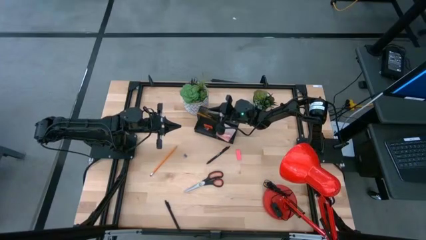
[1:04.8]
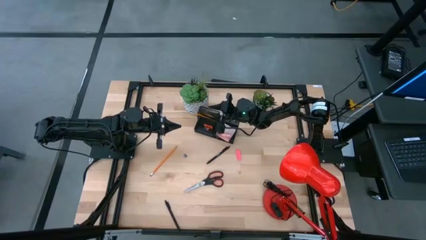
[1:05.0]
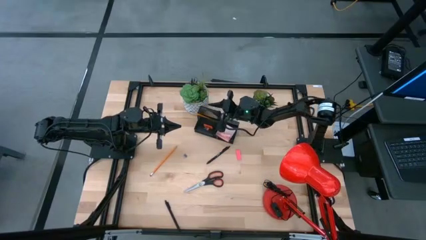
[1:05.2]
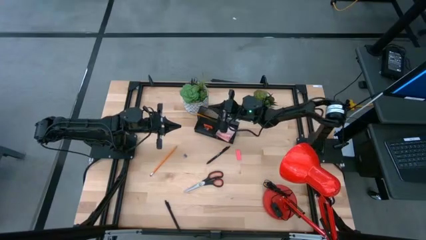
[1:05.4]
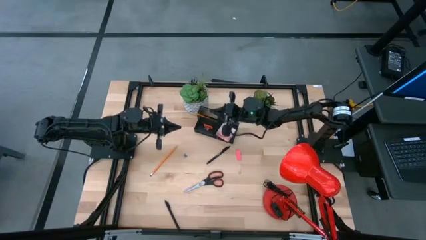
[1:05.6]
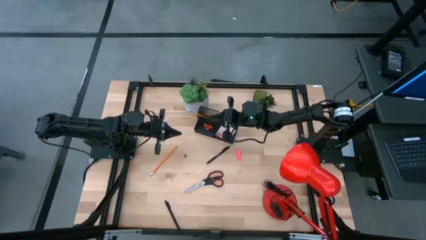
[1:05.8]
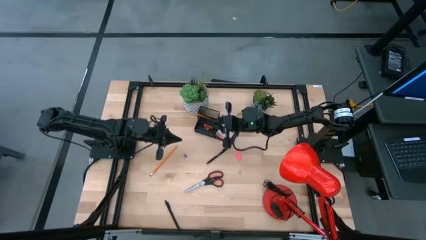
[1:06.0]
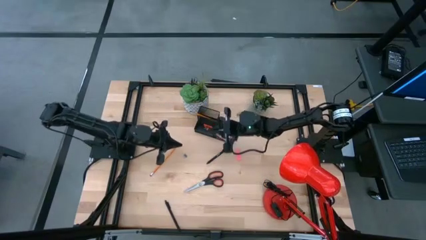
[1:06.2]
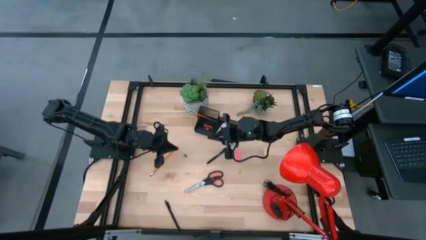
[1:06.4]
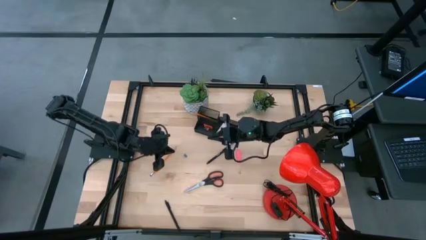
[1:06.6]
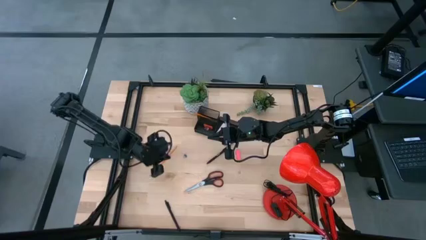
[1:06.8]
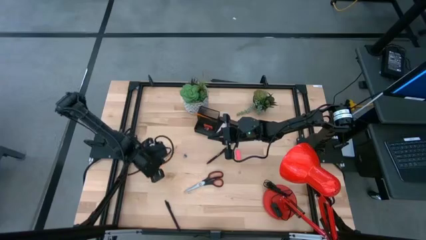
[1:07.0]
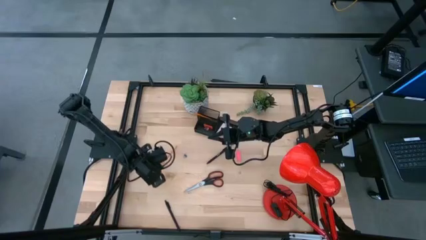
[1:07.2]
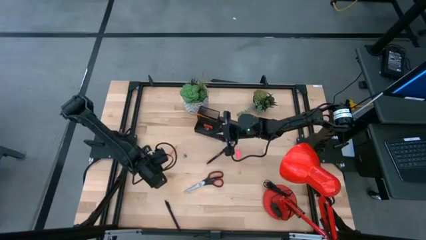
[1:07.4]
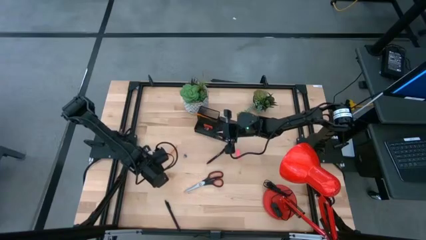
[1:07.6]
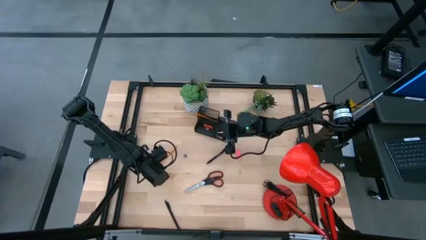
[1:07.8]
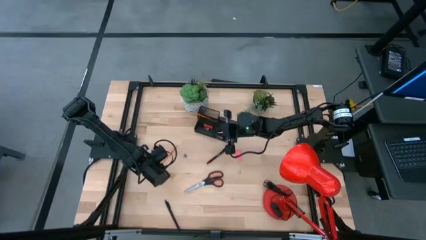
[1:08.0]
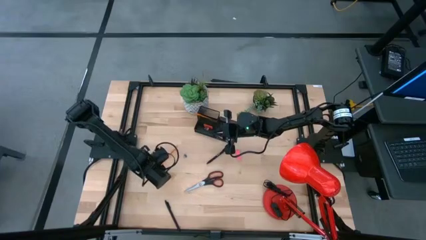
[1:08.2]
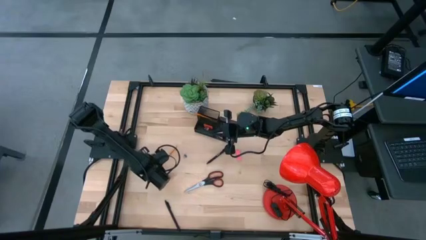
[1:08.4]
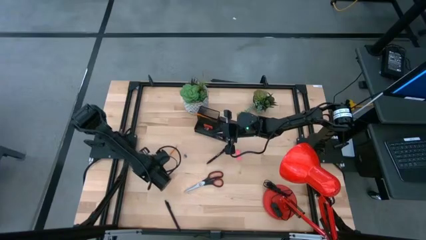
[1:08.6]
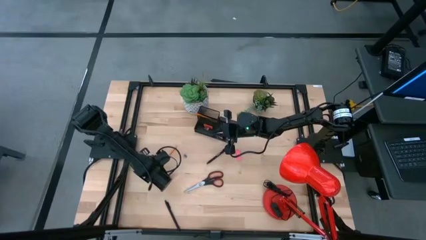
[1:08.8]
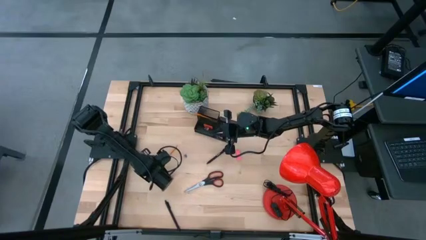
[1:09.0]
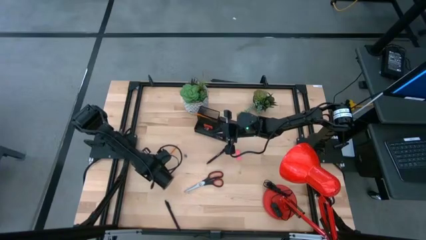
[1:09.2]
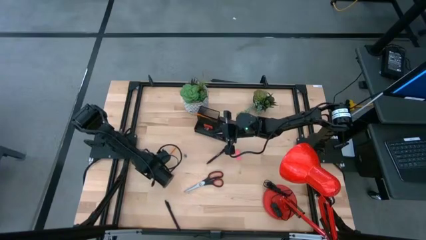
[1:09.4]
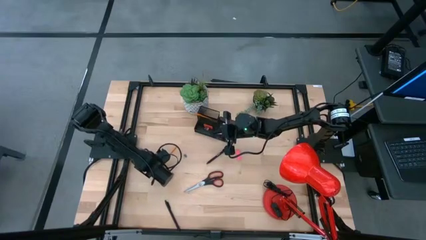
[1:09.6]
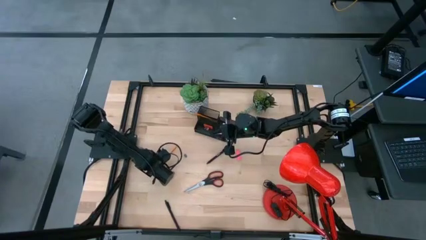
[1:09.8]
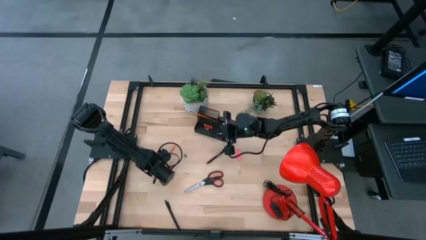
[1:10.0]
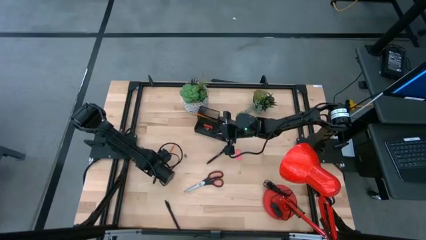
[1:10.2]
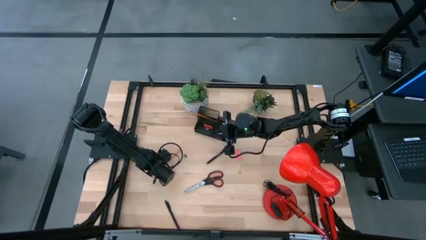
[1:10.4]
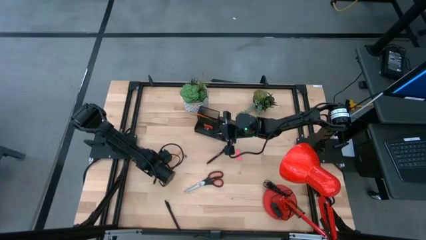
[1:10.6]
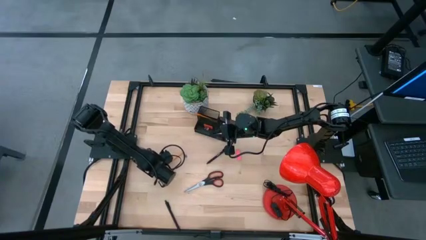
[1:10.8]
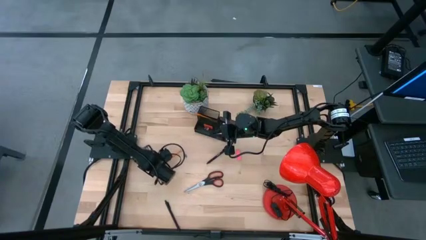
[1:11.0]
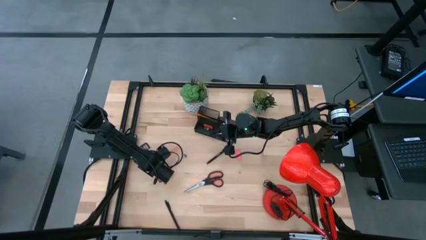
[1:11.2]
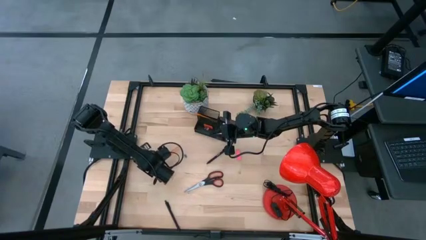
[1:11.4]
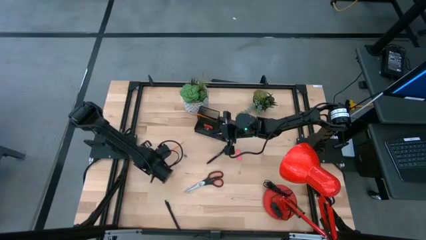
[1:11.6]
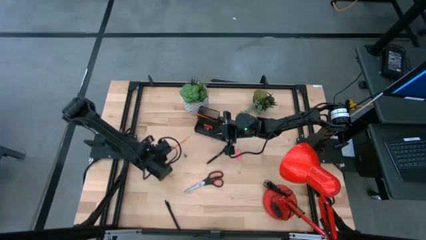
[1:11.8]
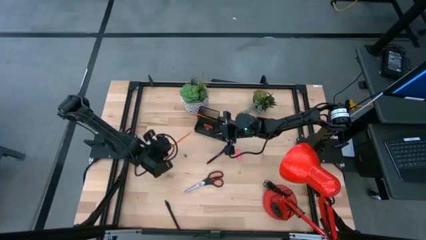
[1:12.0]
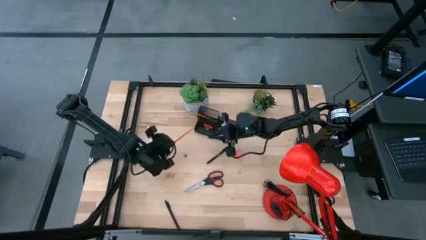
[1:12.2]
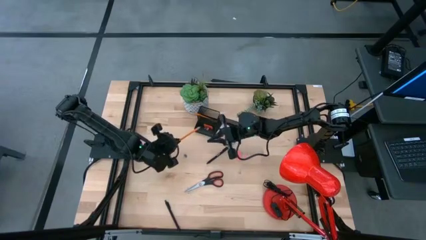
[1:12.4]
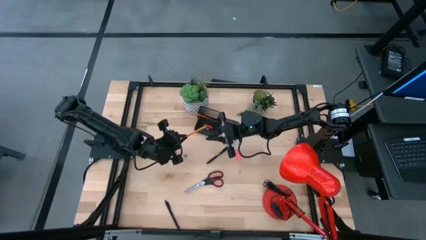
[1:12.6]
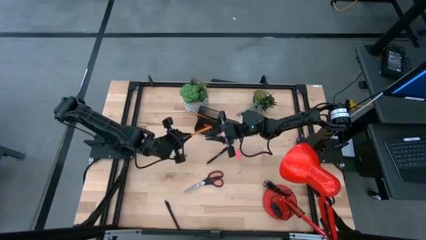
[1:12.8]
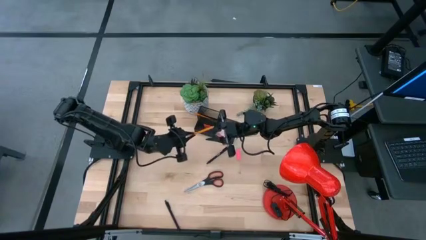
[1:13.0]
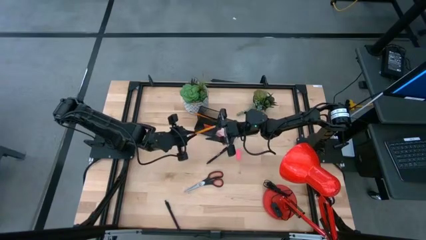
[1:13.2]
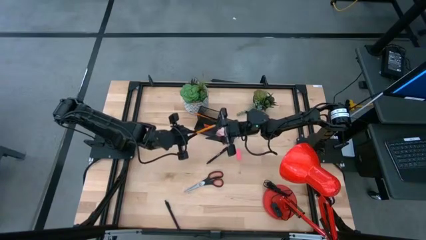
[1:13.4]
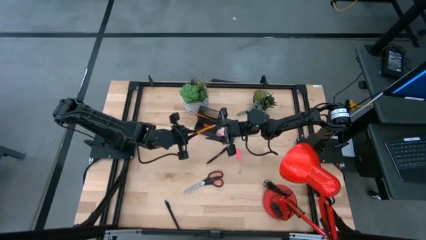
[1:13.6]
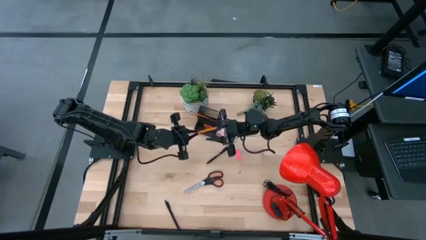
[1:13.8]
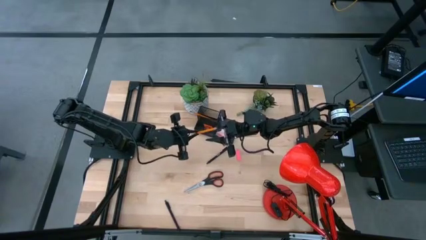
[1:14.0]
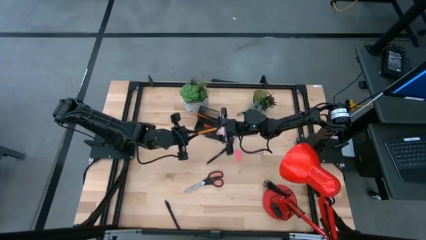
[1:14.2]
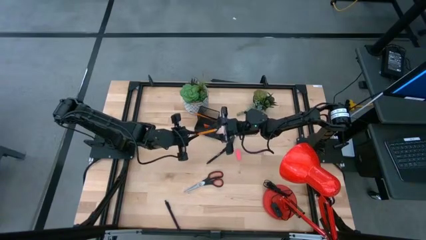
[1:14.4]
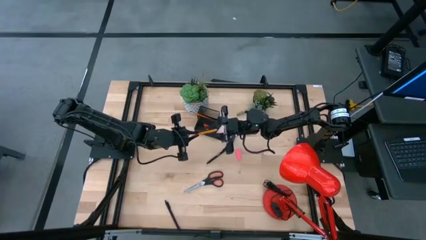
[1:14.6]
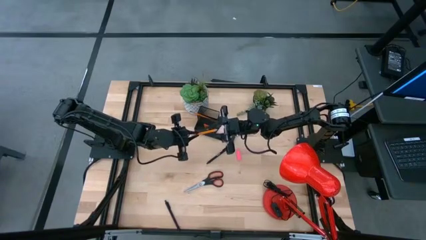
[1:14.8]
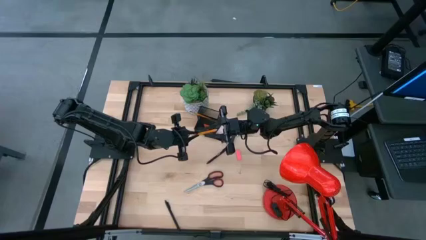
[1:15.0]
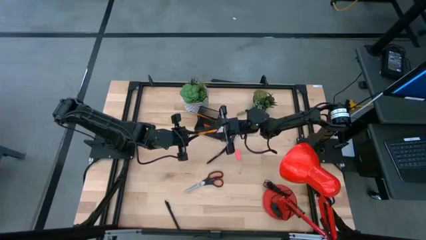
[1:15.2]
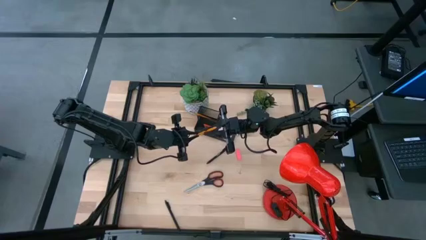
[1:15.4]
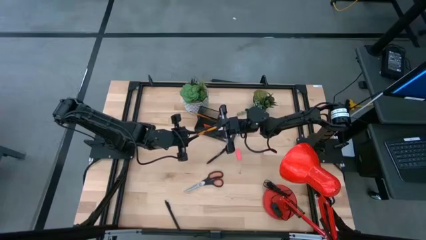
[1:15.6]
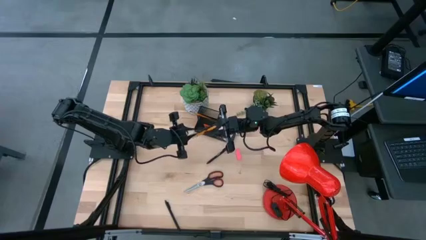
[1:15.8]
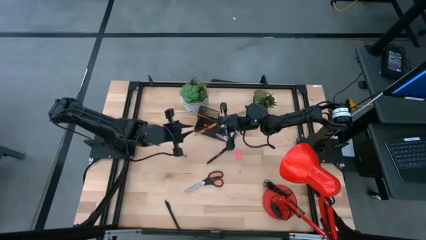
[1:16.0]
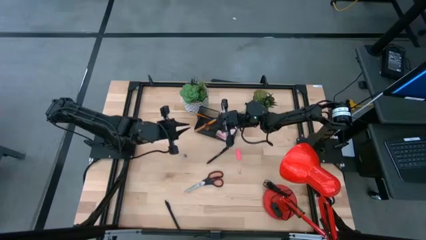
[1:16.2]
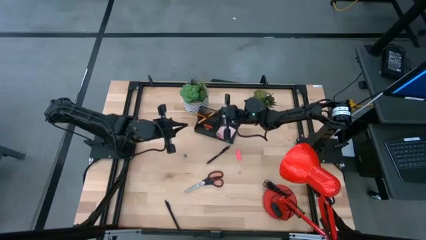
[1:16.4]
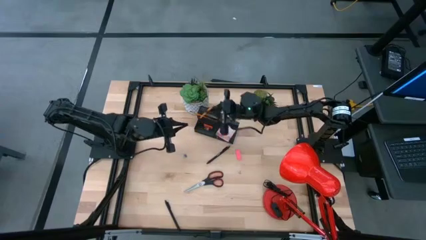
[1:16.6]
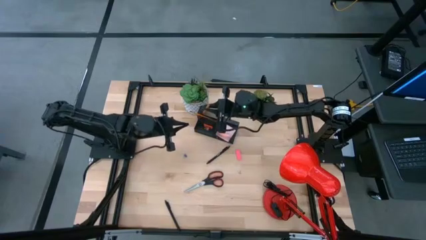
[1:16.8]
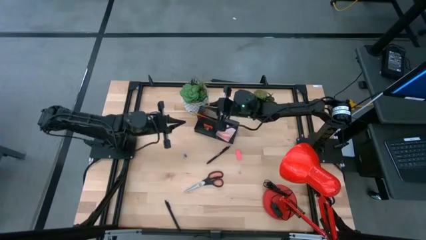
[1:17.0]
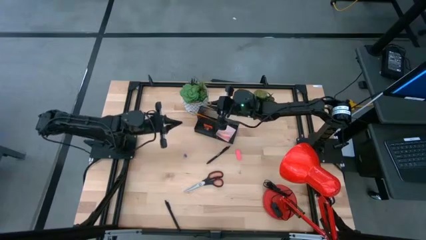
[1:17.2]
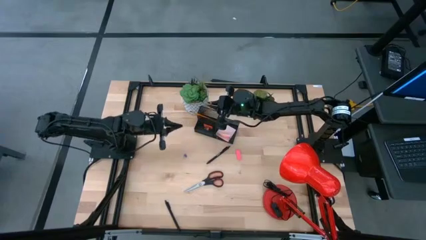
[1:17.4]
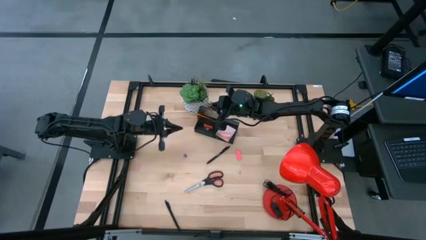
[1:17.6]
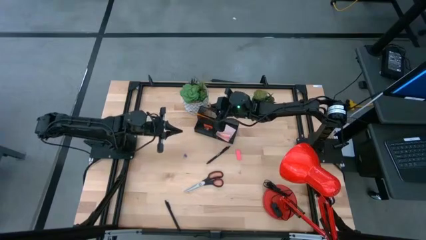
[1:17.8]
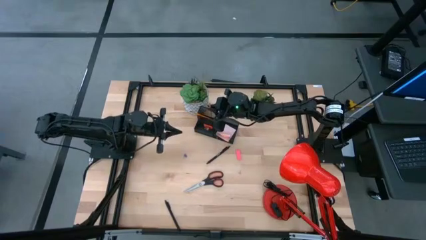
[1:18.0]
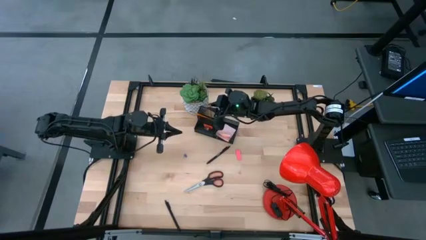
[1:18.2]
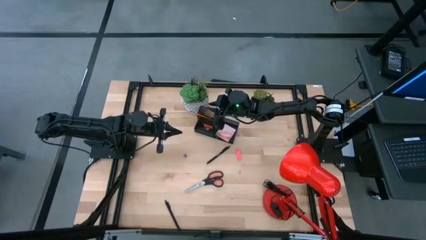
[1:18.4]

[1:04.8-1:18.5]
Task: Pick and place office supplies into organizer
Put the orange pencil into the black desk organizer

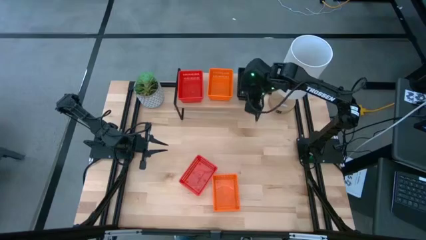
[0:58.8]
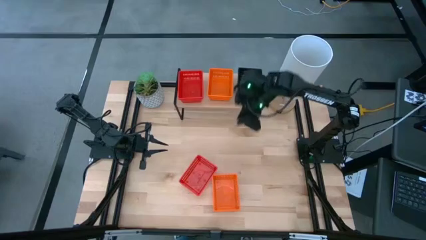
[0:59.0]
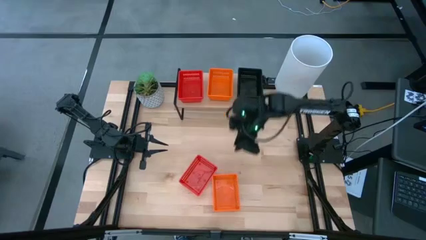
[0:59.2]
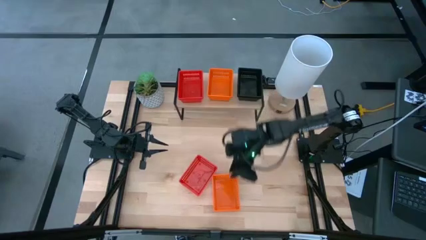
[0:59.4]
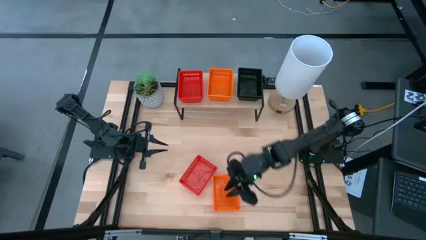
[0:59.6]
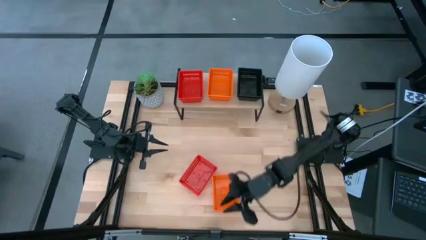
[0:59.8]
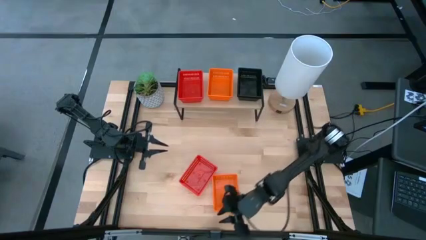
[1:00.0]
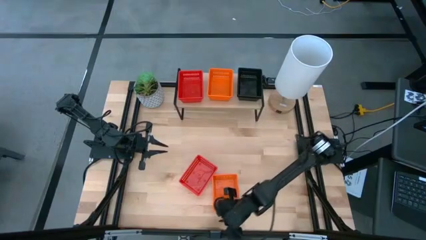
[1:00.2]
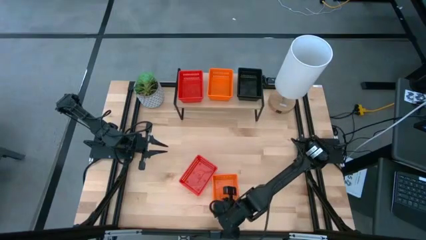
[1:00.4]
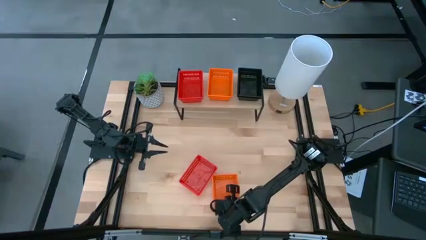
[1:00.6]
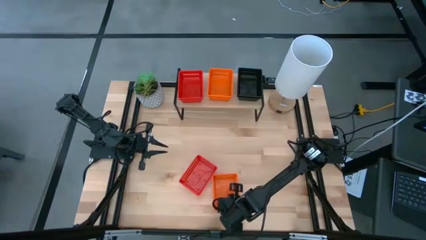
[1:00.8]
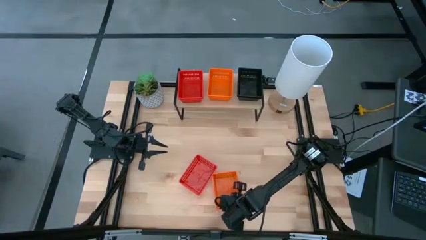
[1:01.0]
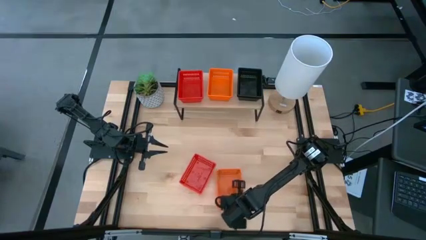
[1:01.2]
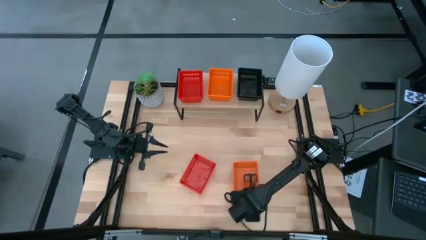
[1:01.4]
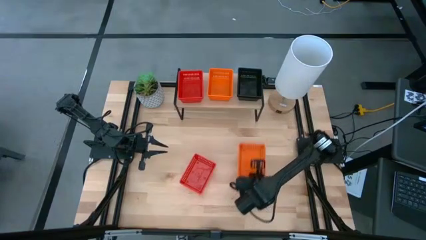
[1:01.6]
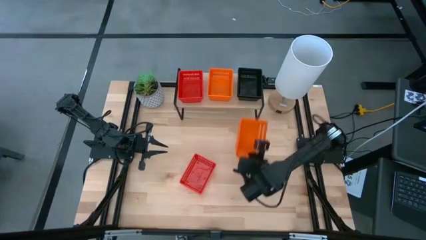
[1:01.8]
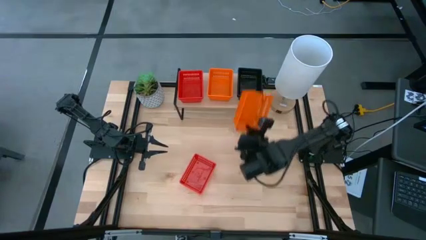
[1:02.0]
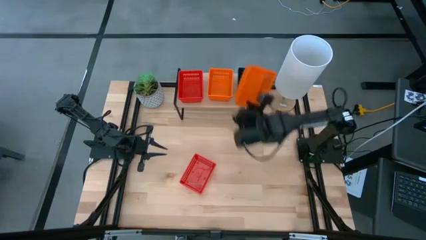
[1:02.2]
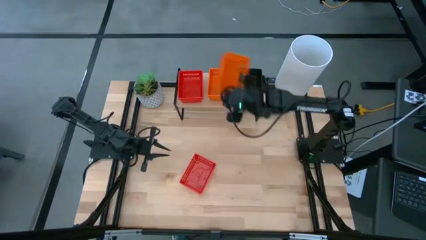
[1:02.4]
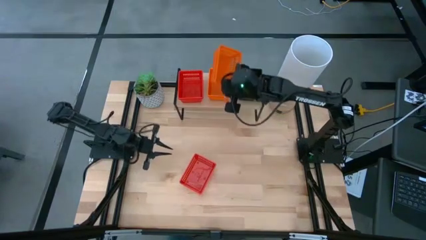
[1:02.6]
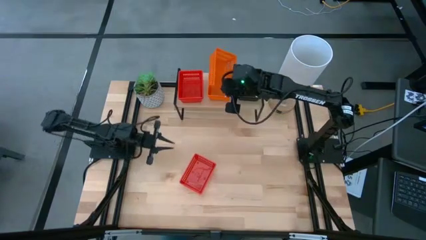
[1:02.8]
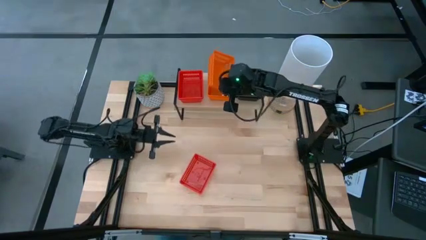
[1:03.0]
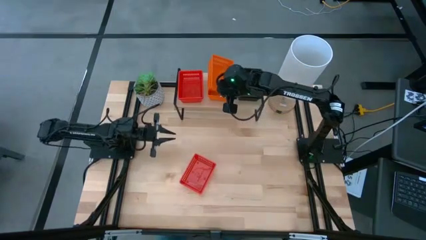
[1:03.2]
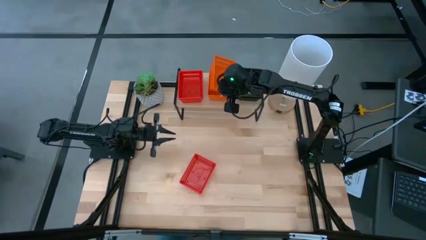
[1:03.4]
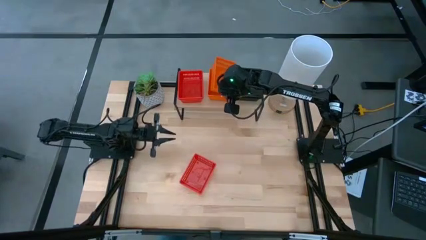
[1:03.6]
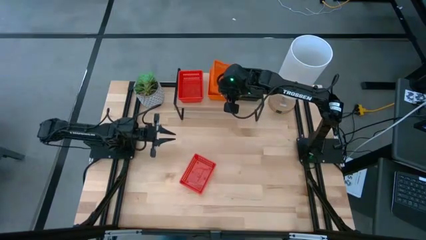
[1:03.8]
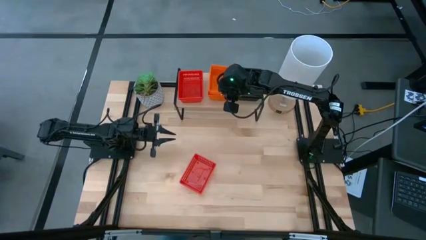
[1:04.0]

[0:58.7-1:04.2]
Task: Stack baskets on shelf by color
Stack the orange basket on the orange basket
